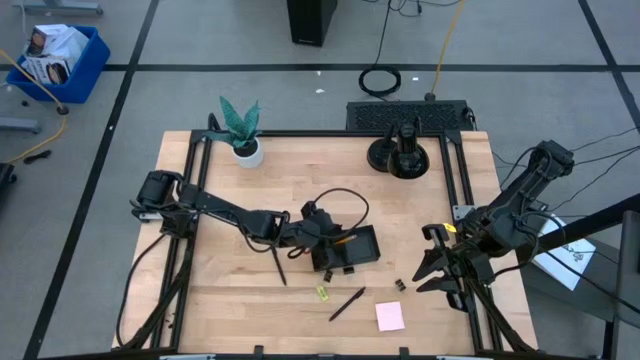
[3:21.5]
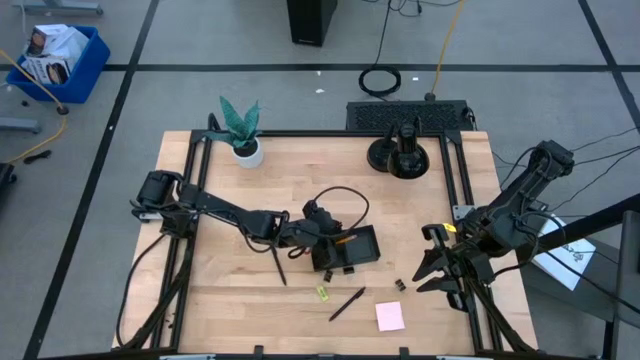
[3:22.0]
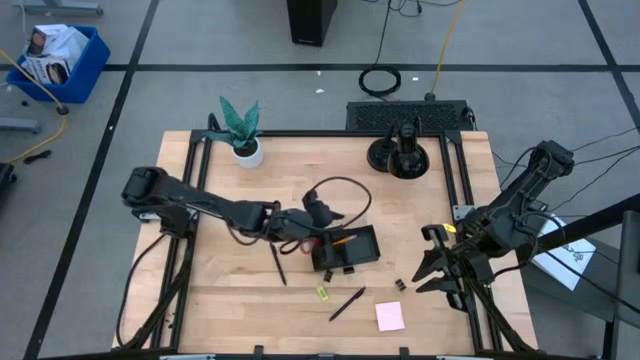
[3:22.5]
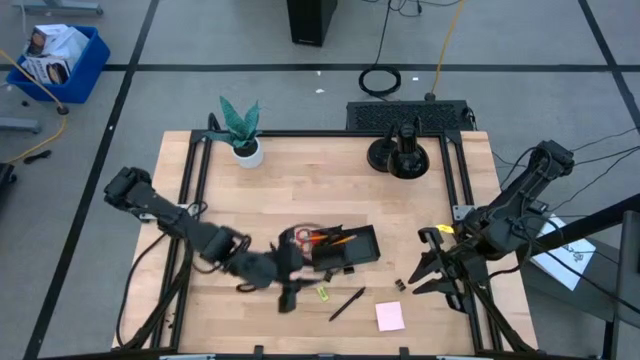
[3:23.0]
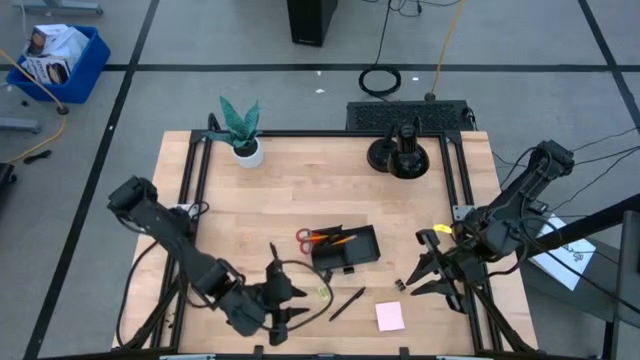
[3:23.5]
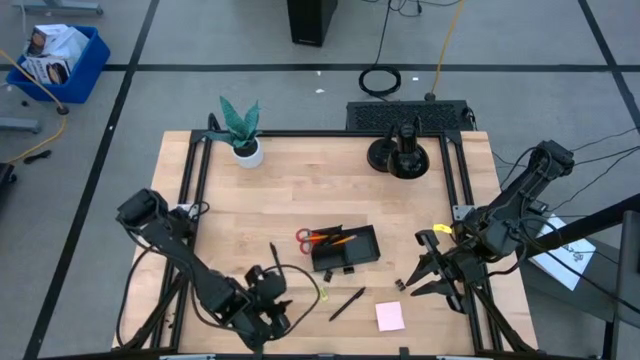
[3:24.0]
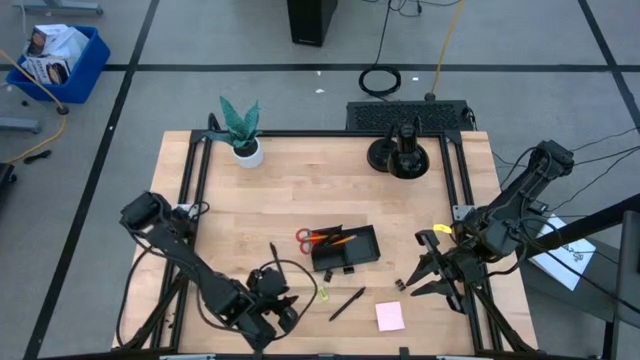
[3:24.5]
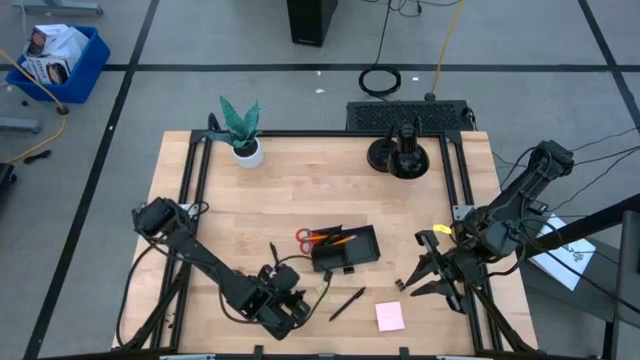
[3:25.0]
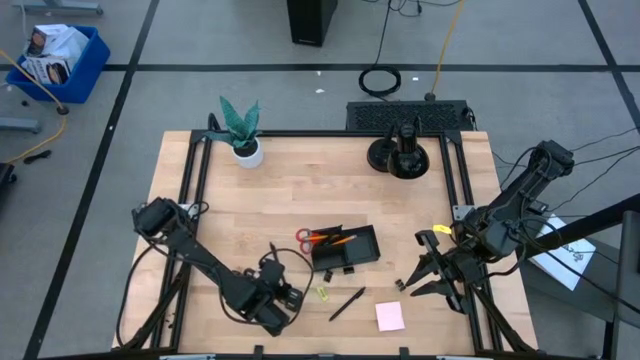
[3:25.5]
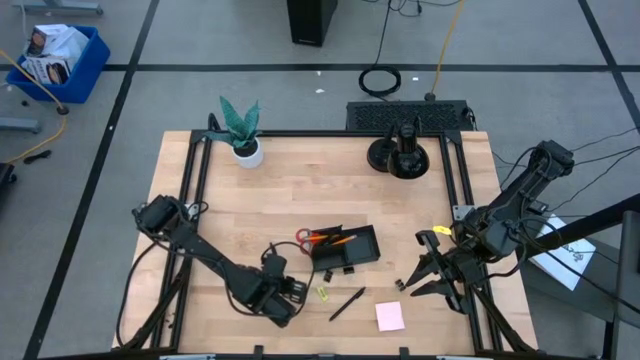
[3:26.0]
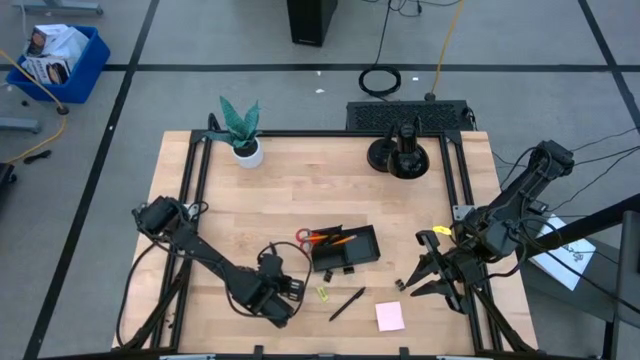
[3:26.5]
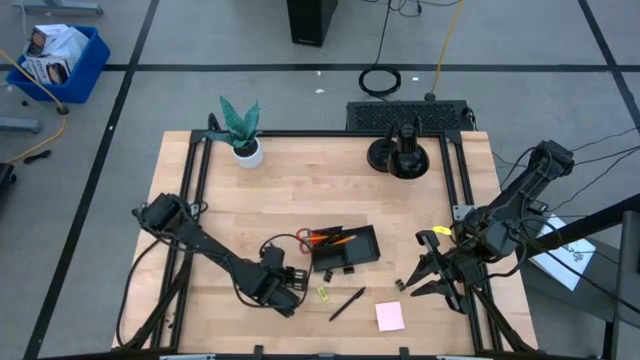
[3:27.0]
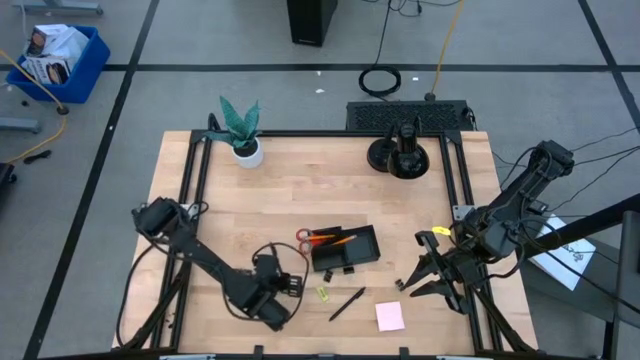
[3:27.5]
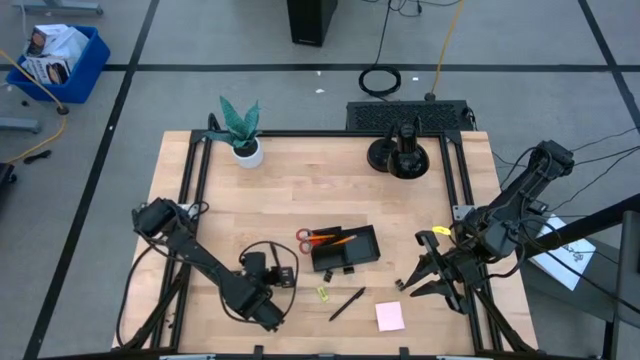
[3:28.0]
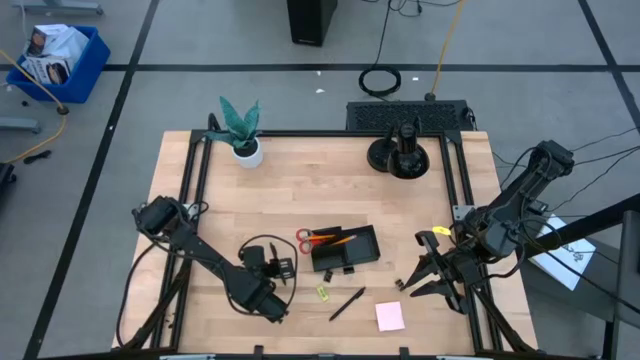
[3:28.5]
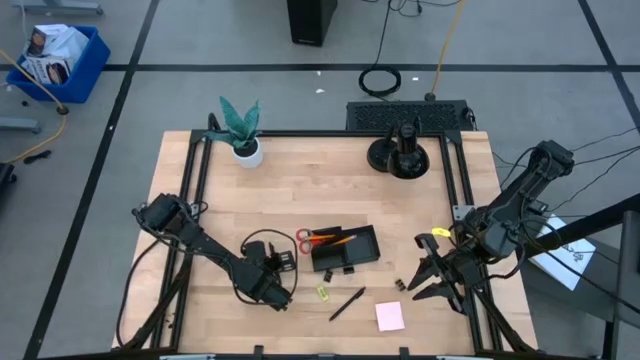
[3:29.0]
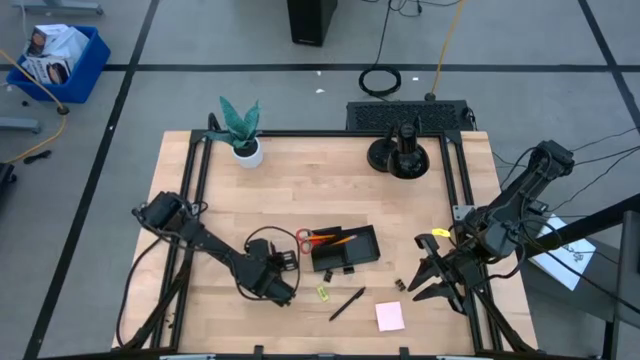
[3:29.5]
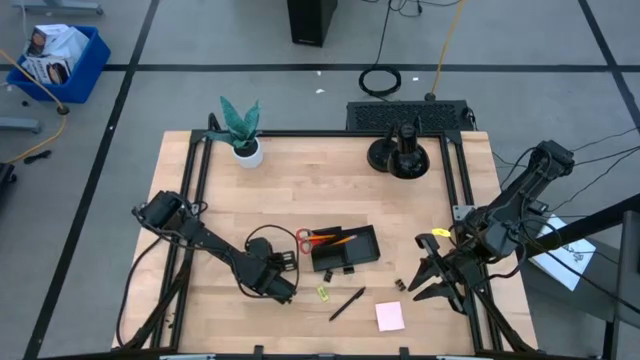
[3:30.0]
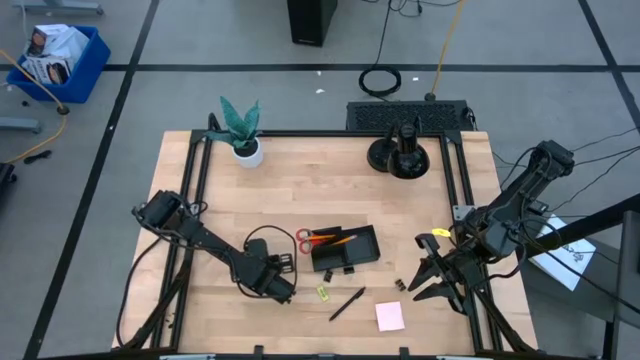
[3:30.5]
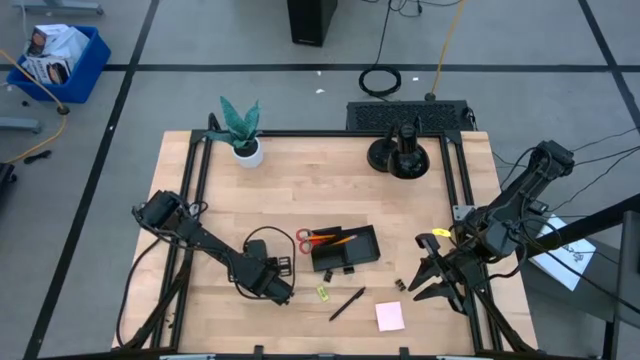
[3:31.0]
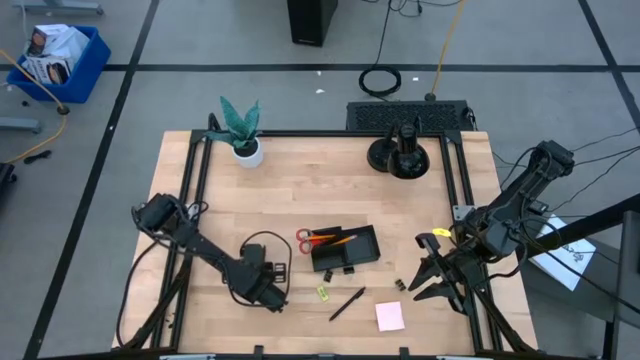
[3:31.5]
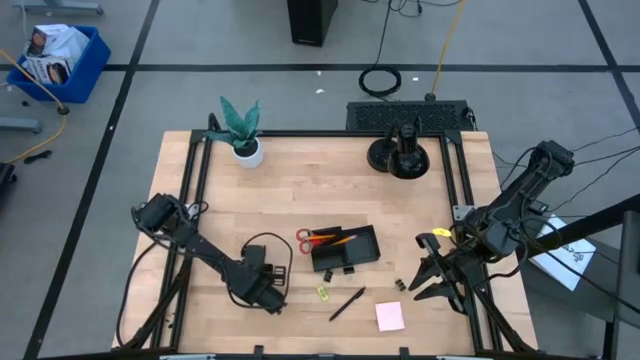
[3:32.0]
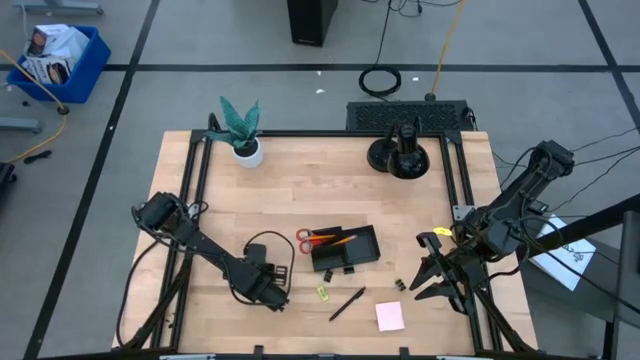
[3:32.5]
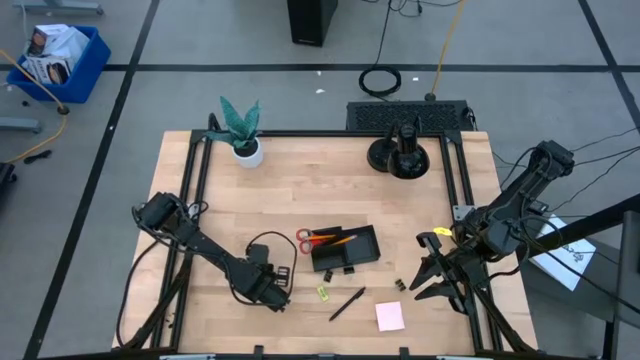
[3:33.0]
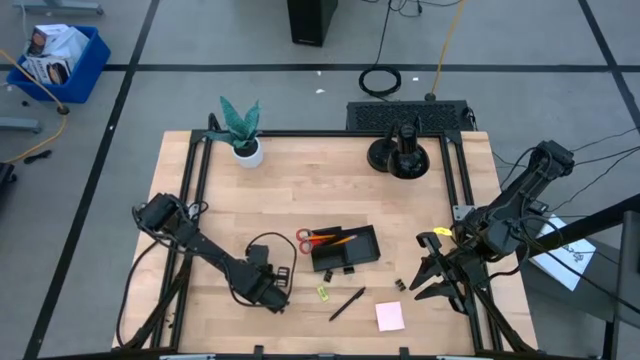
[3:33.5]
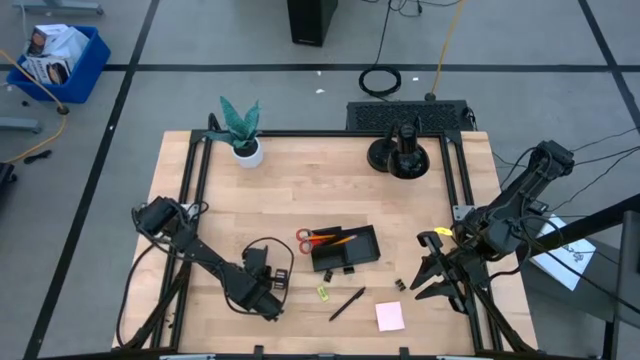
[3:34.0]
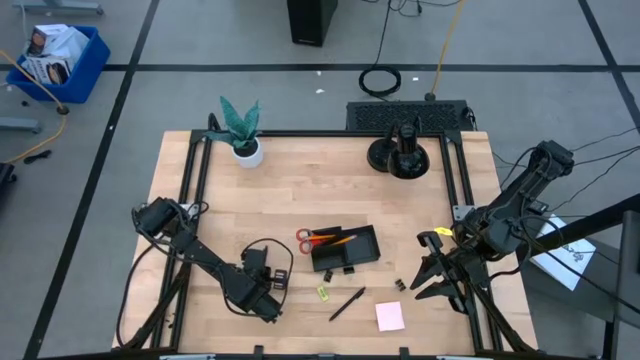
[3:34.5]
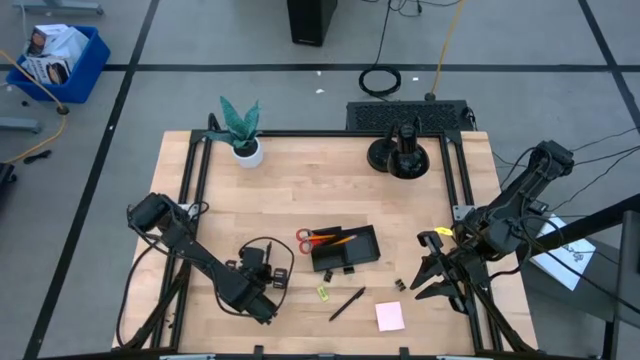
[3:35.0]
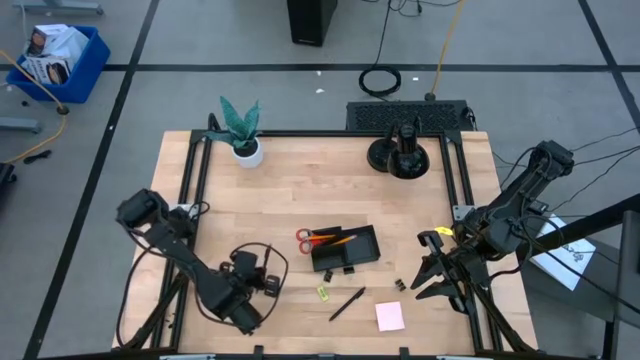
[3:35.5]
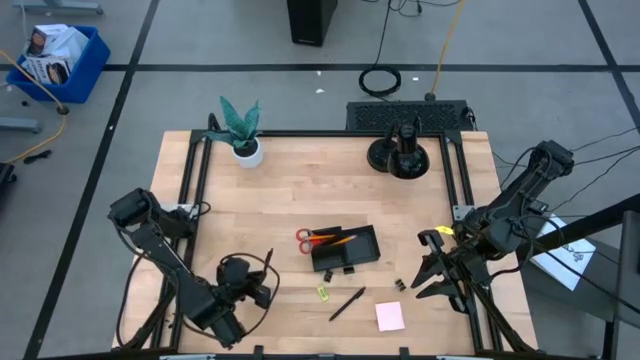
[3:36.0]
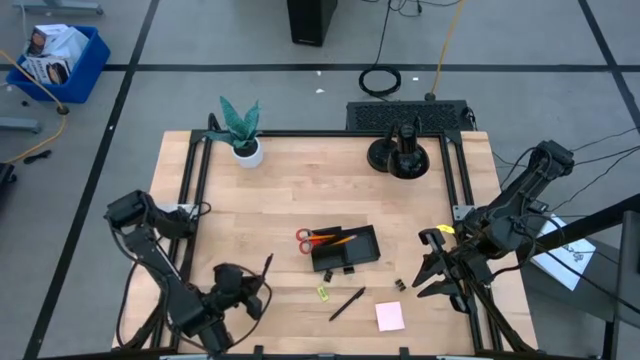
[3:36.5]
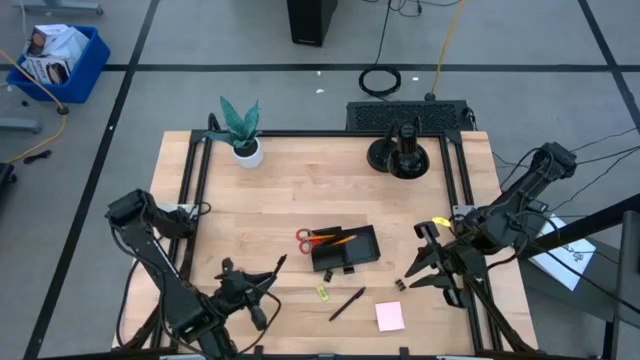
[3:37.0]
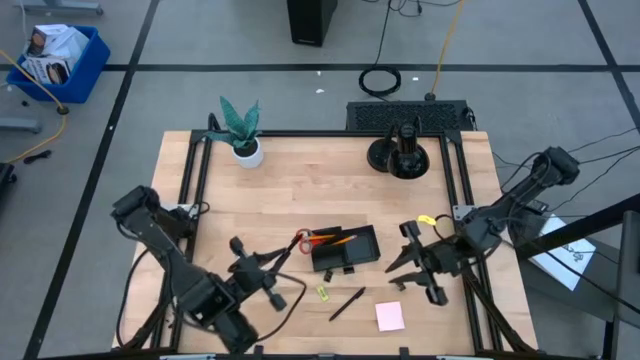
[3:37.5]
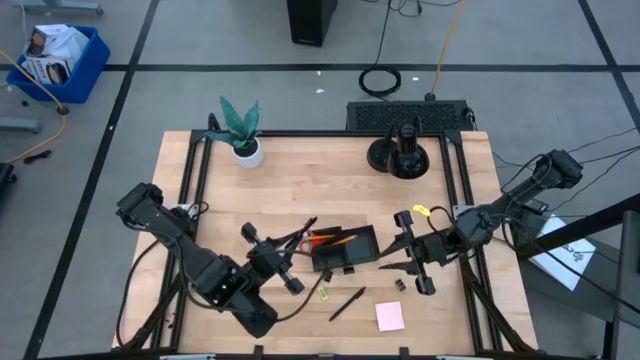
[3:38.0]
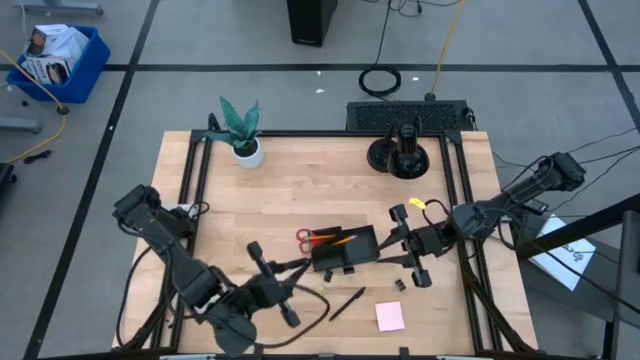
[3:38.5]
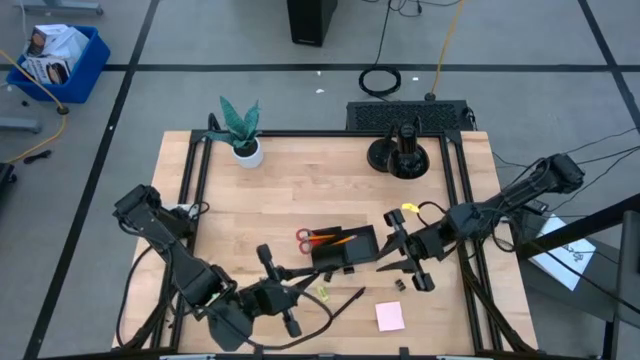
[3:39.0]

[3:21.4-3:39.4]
Task: Pick and place office supplies into organizer
Put the left black pen into the black desk organizer

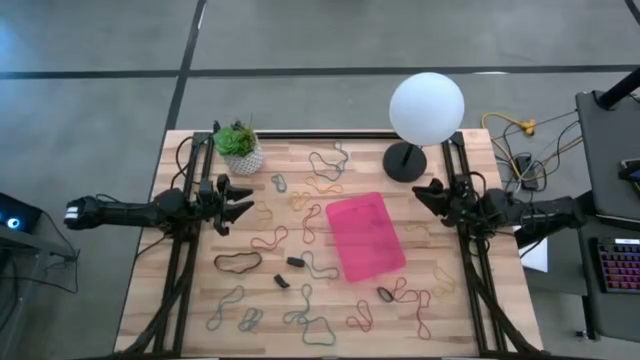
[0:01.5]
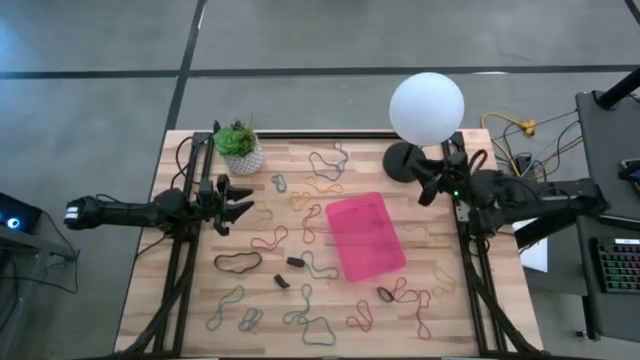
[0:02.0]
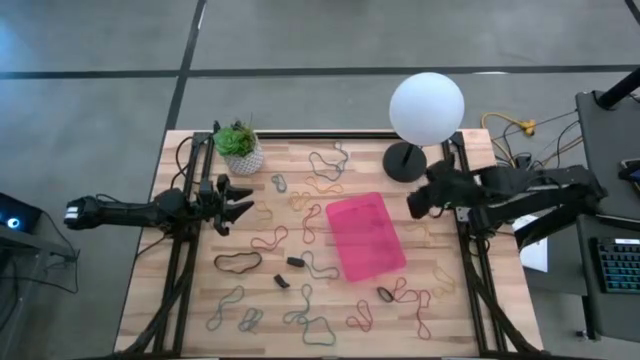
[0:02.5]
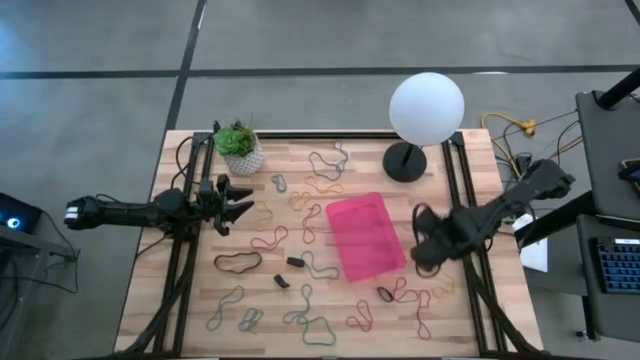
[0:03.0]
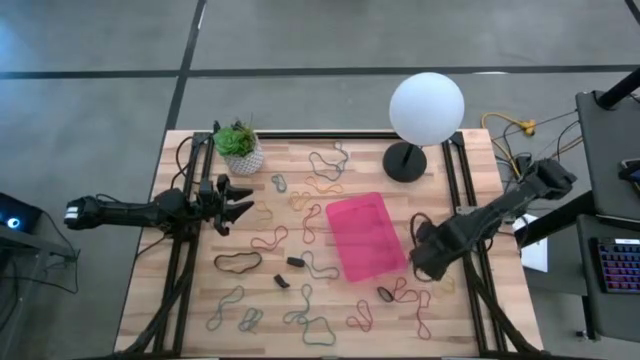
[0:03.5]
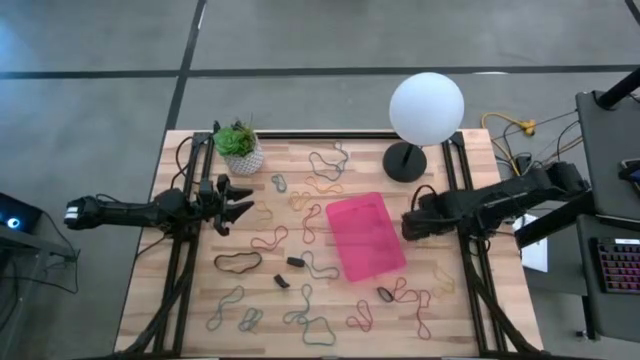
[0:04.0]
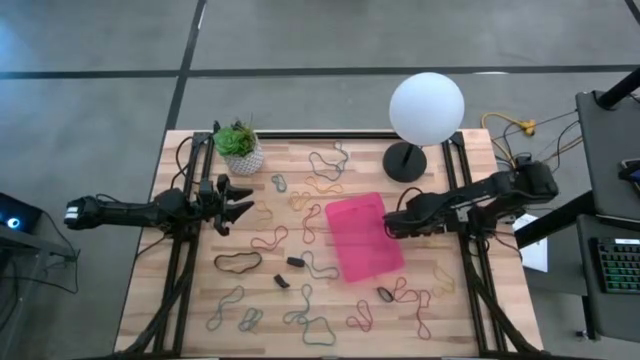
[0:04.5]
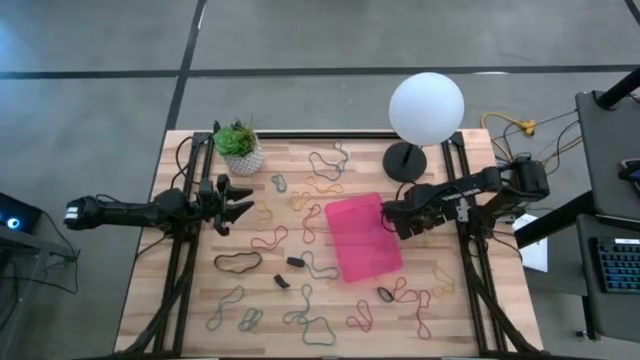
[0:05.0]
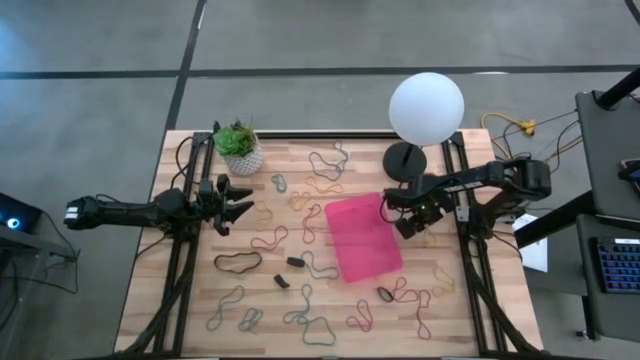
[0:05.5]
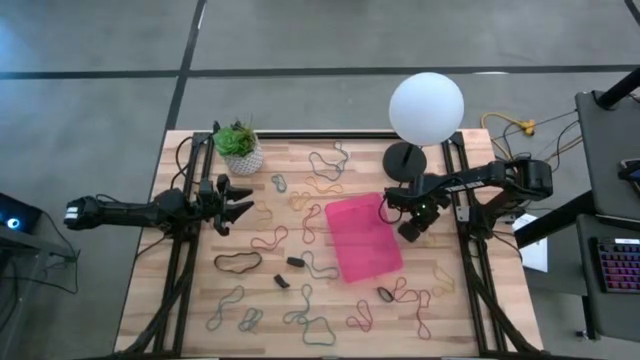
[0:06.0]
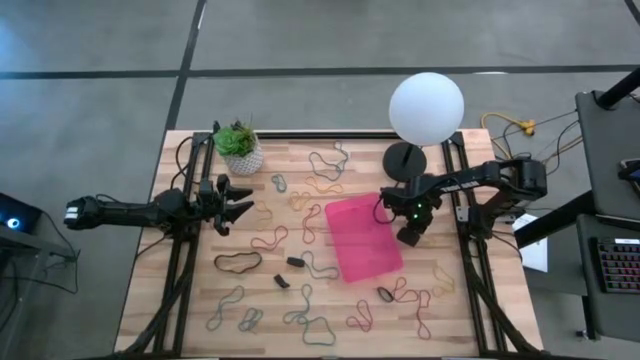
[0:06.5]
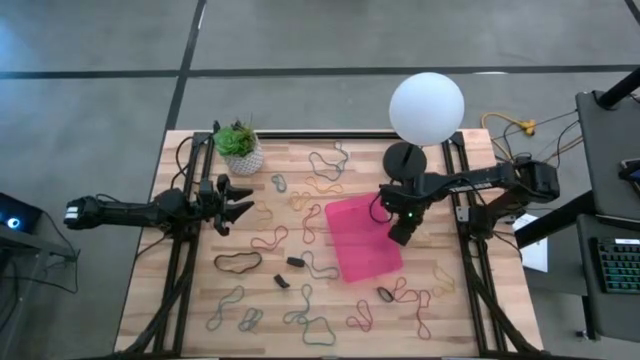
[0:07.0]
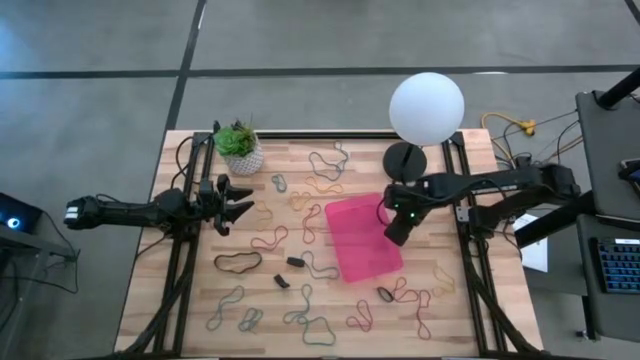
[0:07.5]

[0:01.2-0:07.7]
Task: Pick and place rubber bands into bin
Put the yellow rubber band into the pink bin
